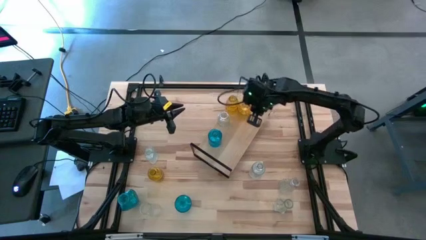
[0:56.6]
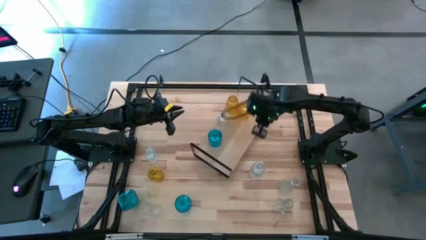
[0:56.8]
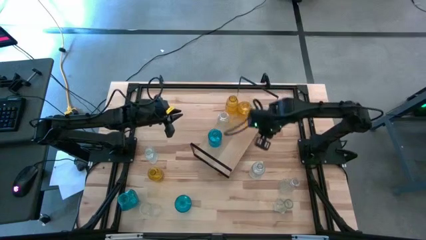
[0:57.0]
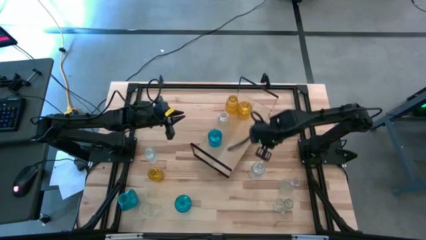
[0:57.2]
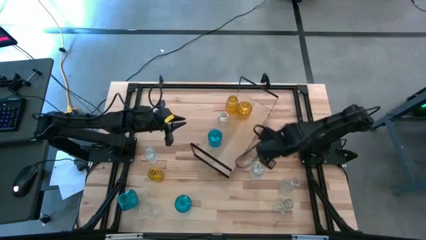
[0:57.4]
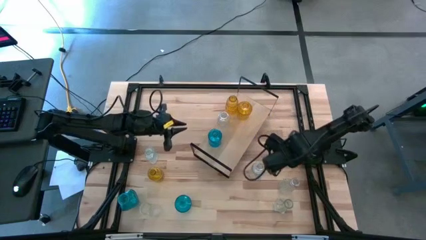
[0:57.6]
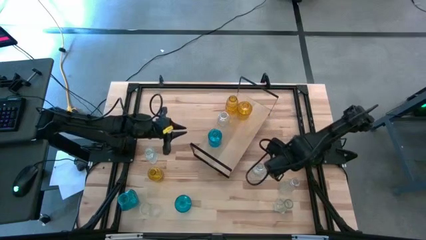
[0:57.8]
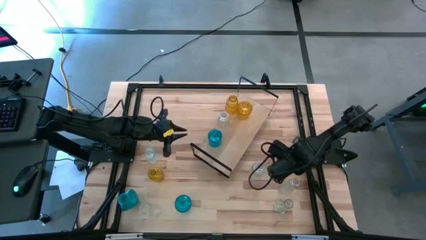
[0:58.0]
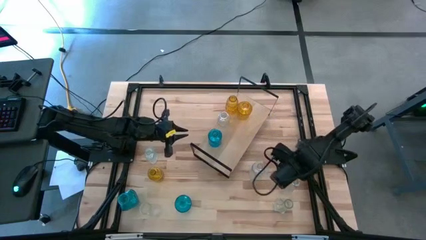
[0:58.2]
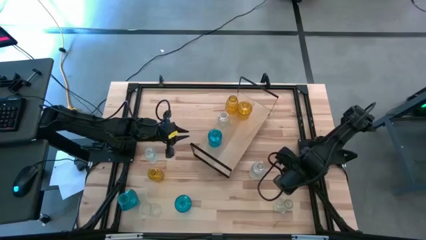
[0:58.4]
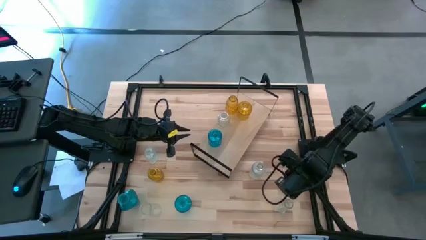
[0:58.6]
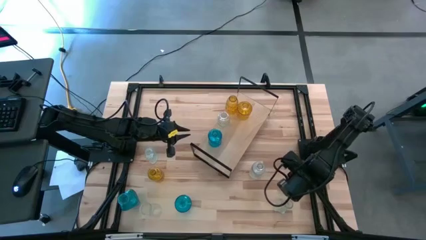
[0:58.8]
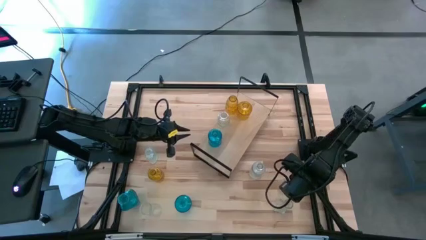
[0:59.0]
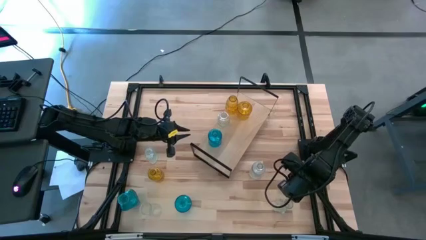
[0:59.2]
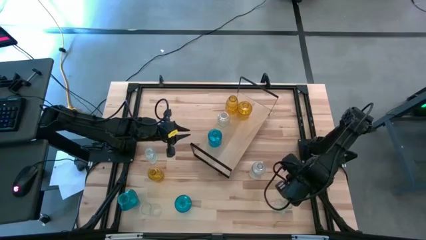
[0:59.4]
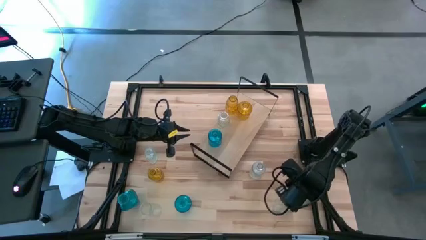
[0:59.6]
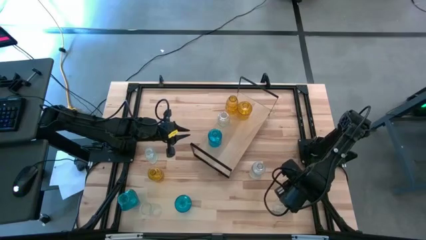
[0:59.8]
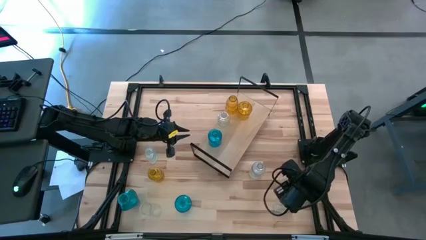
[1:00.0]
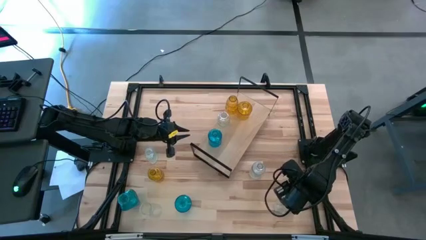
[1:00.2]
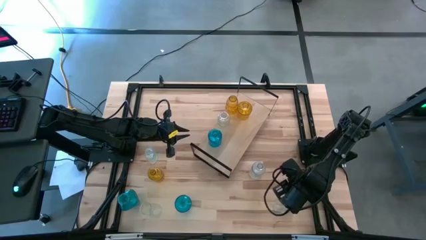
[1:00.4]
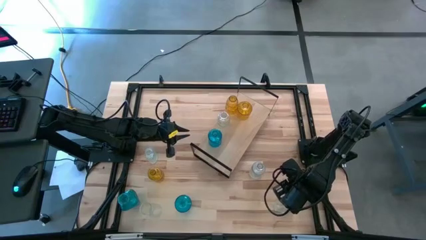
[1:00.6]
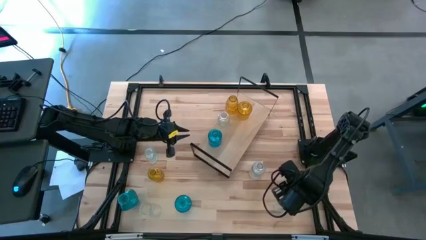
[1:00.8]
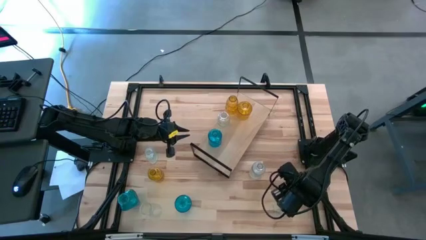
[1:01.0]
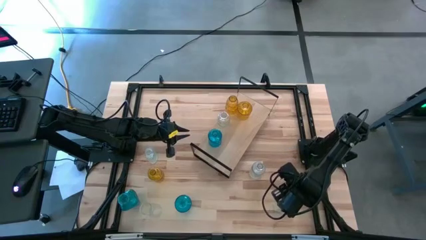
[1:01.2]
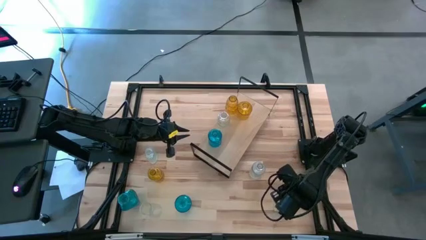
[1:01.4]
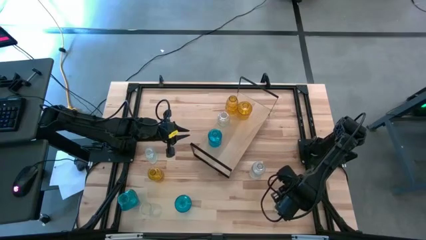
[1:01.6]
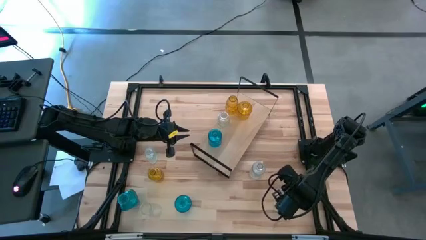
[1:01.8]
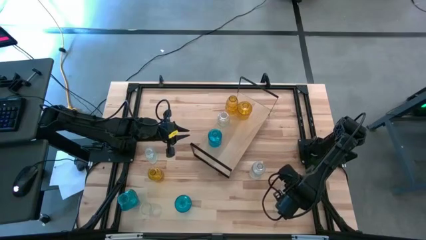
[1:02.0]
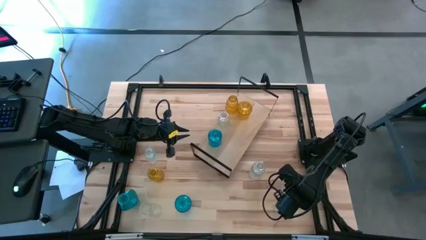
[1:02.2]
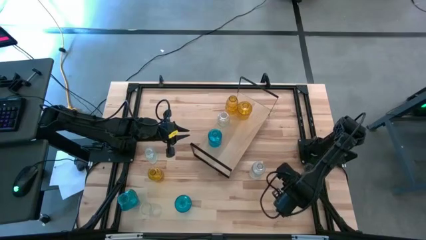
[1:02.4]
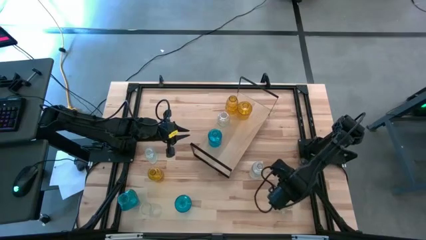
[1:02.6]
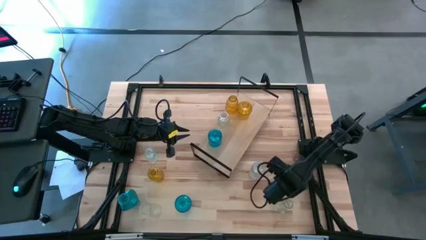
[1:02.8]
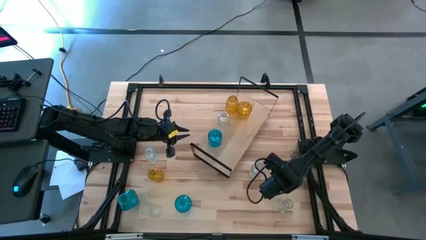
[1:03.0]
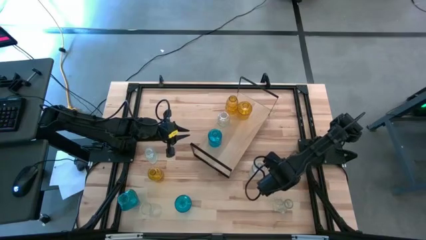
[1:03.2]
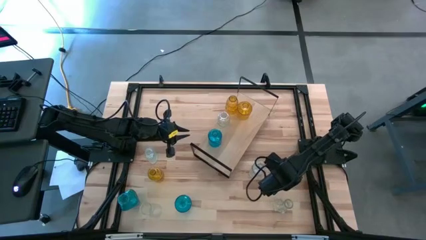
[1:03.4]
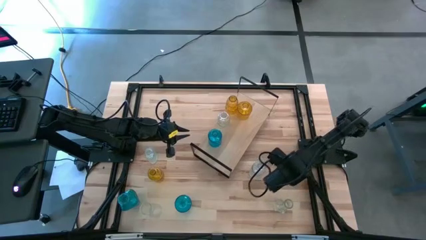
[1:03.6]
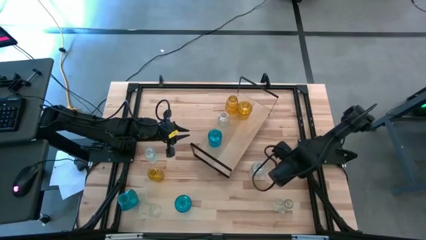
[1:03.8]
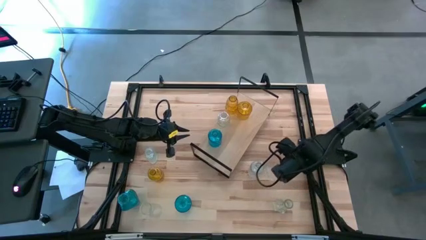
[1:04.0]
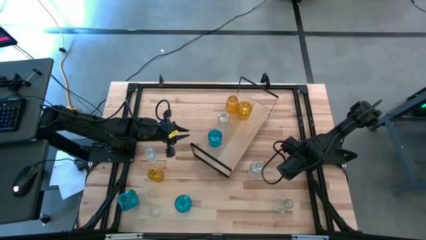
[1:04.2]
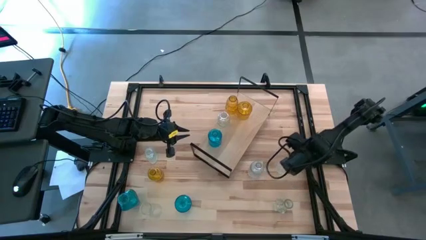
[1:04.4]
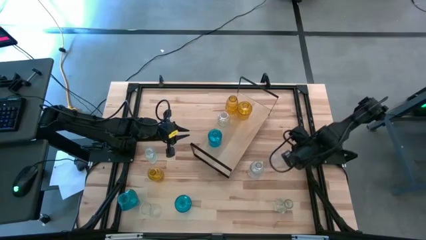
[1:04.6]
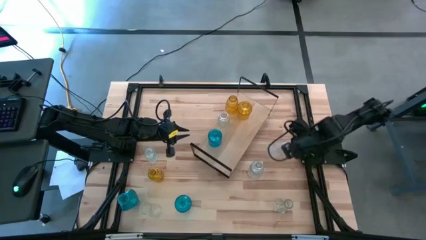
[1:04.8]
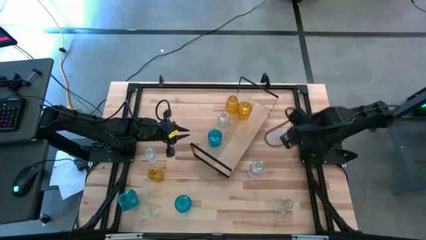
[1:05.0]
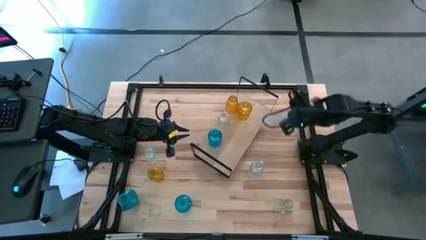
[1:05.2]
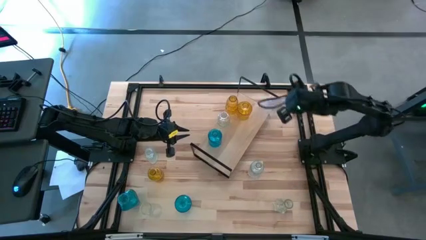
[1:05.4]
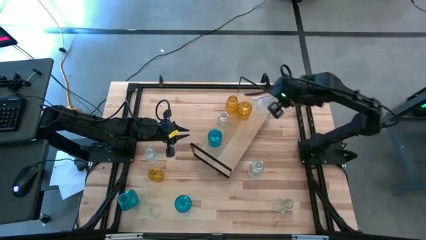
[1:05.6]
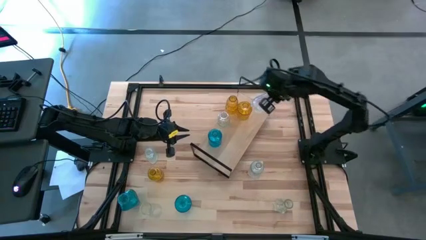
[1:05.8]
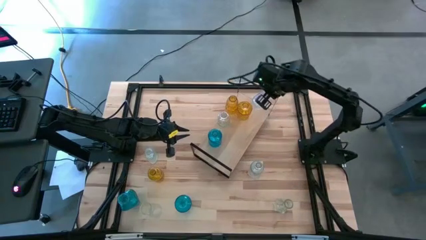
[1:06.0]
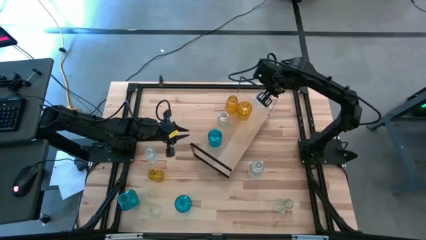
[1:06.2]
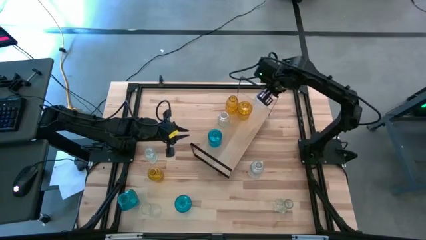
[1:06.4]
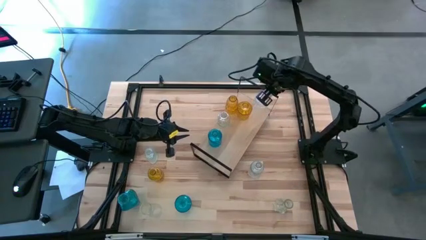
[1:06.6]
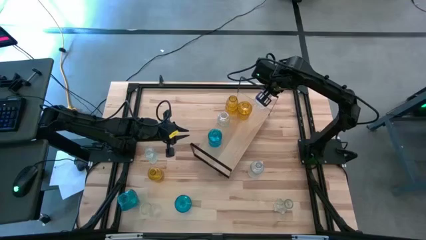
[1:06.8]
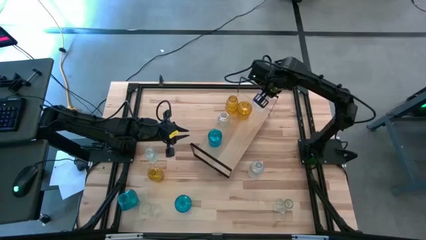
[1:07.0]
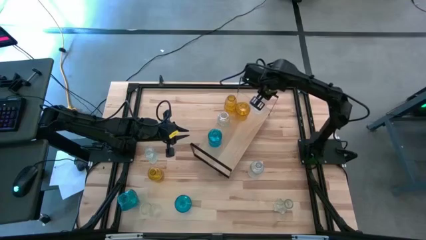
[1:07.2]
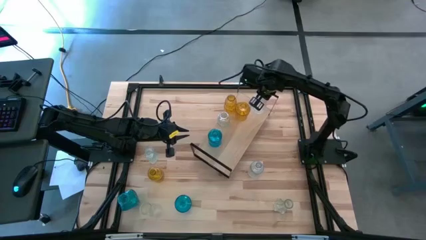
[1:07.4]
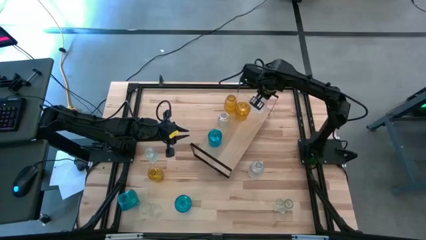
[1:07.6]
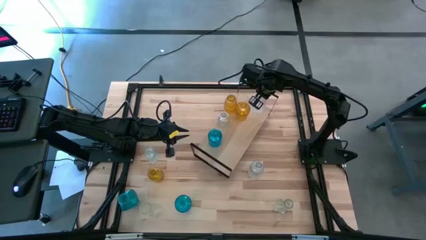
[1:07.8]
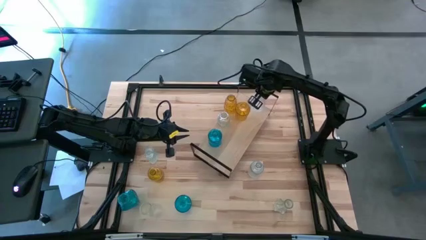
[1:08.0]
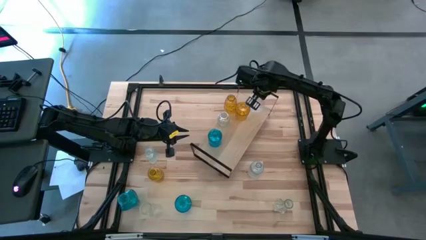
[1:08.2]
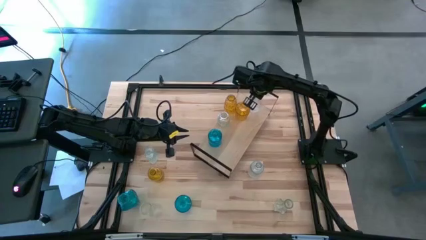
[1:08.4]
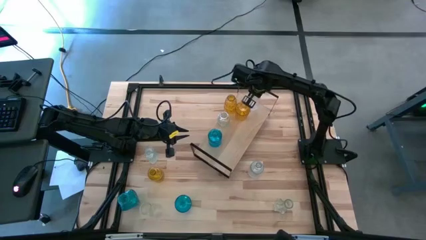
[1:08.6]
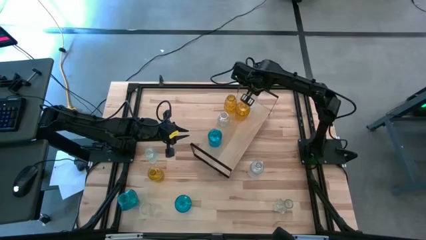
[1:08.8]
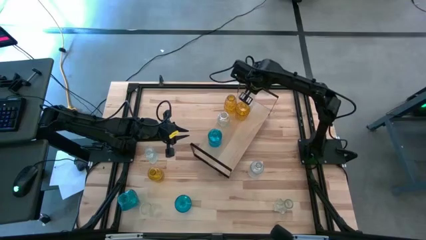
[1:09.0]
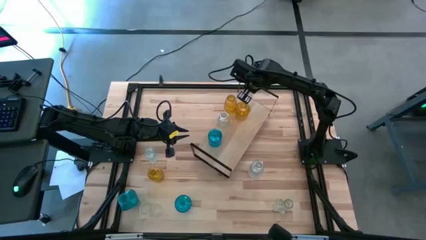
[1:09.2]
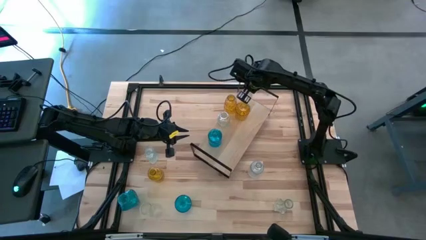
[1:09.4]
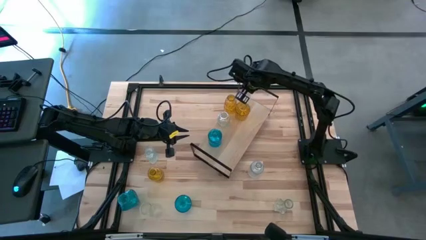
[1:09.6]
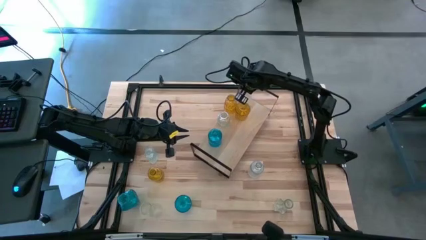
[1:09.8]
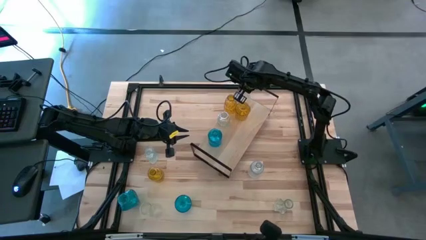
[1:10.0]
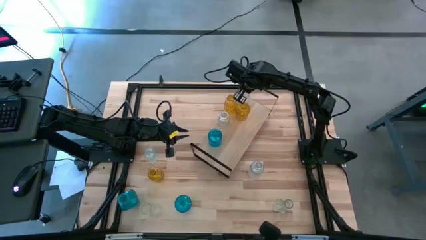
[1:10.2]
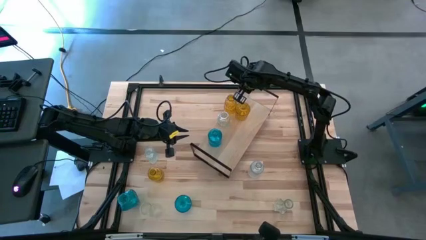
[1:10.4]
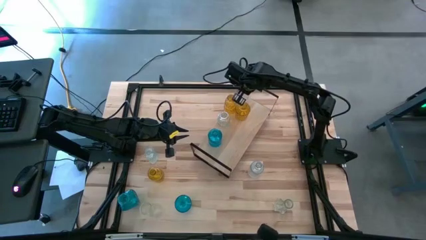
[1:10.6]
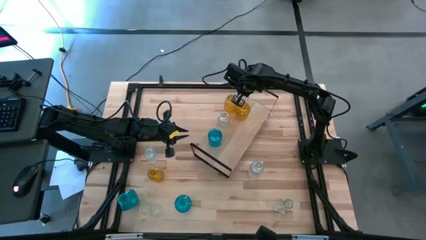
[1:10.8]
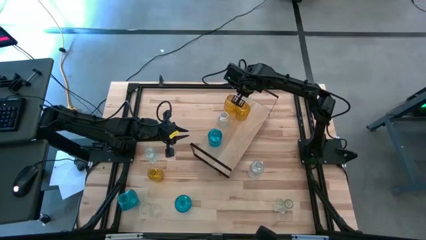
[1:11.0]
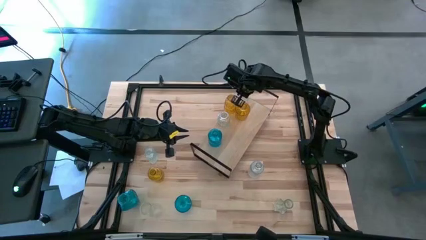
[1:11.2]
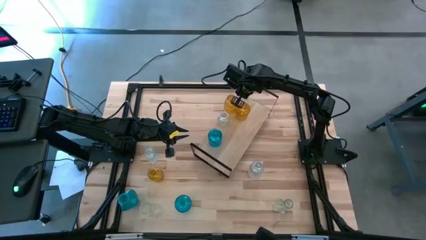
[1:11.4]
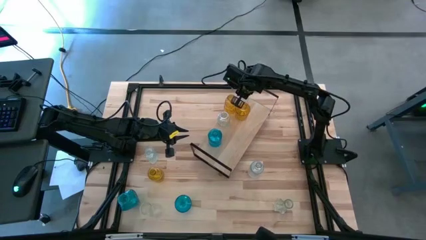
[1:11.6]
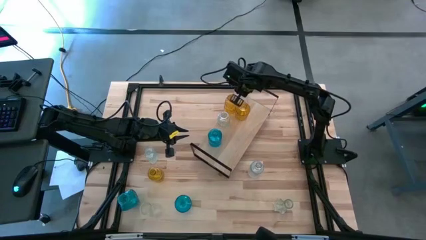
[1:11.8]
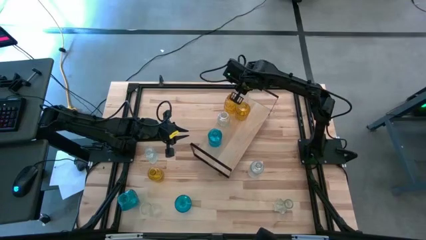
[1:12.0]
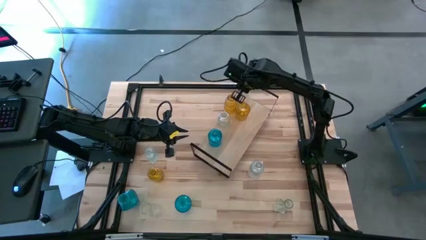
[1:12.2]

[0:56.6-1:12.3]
Task: sort vases onto shelf
Put the middle right transparent vase on the shelf
